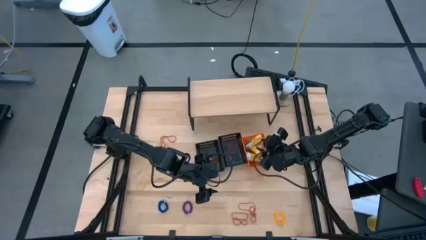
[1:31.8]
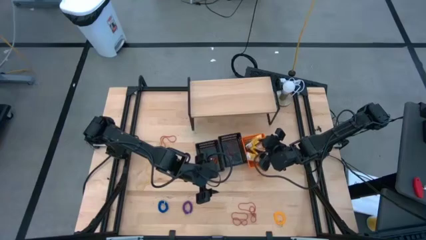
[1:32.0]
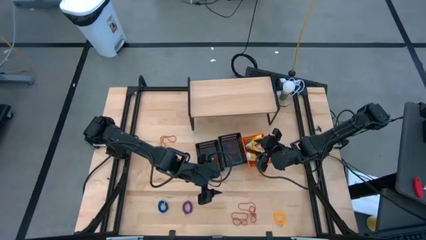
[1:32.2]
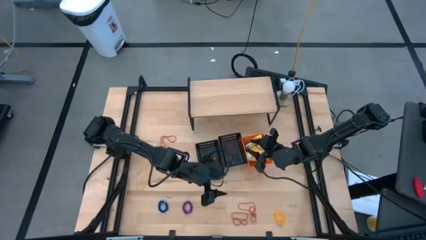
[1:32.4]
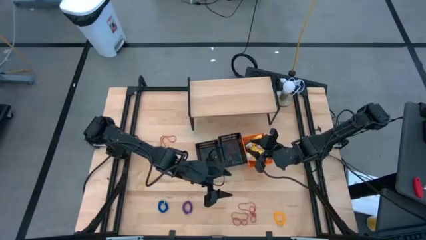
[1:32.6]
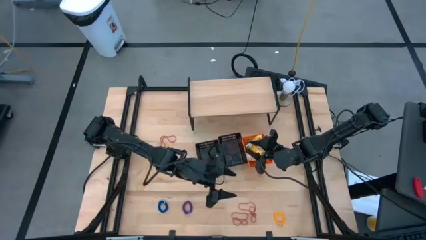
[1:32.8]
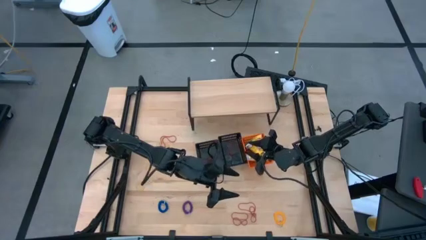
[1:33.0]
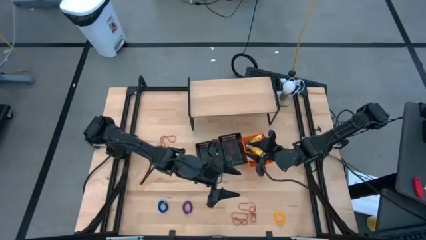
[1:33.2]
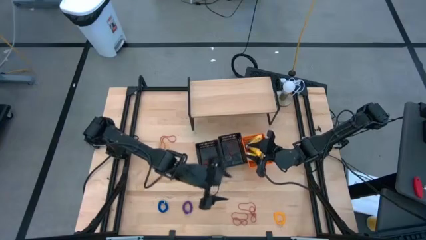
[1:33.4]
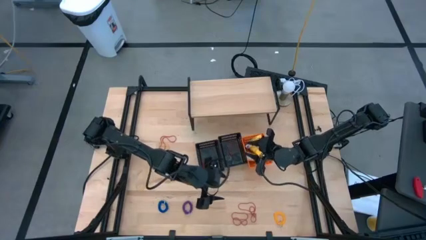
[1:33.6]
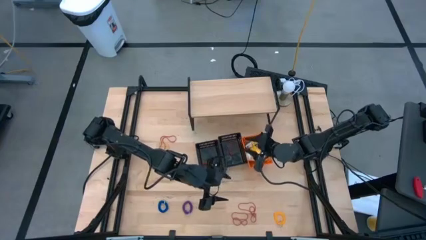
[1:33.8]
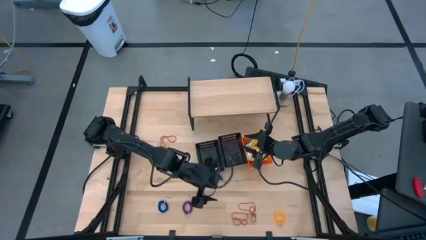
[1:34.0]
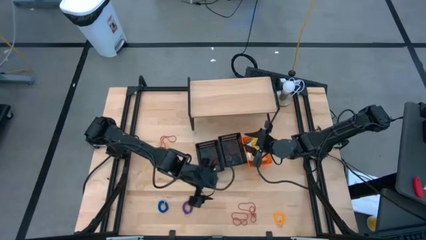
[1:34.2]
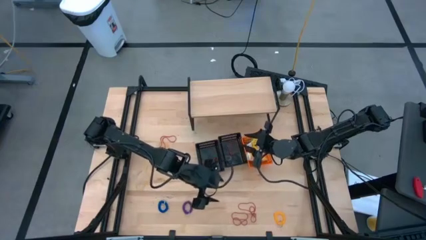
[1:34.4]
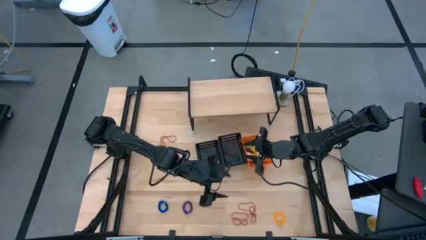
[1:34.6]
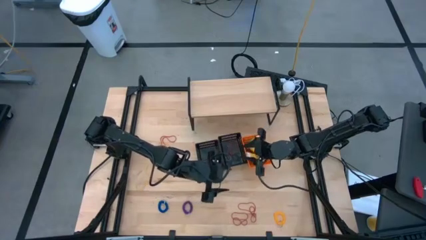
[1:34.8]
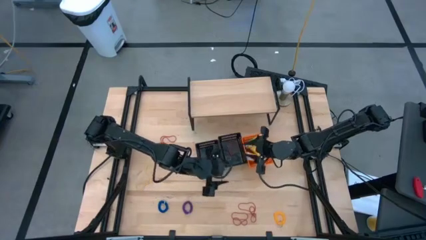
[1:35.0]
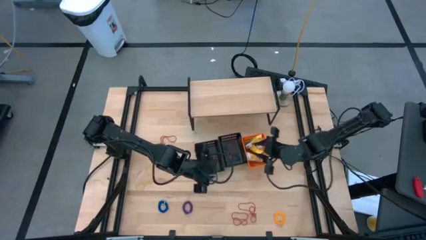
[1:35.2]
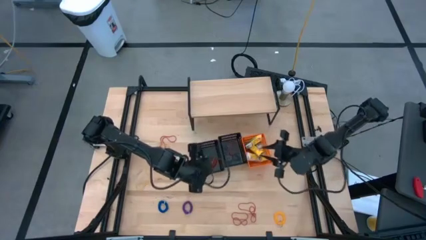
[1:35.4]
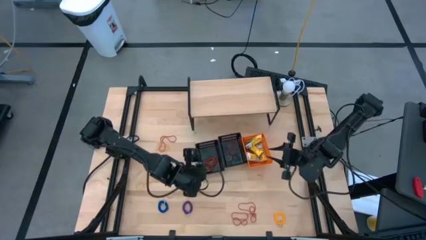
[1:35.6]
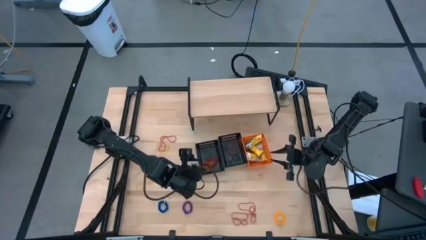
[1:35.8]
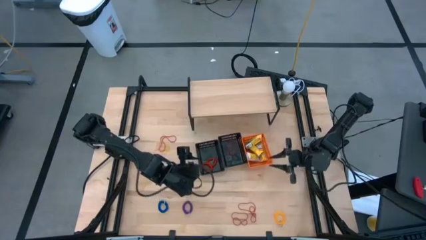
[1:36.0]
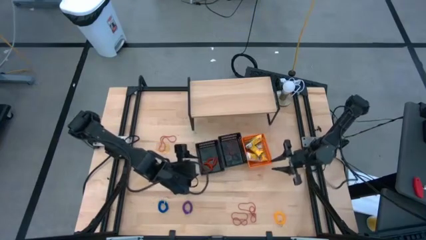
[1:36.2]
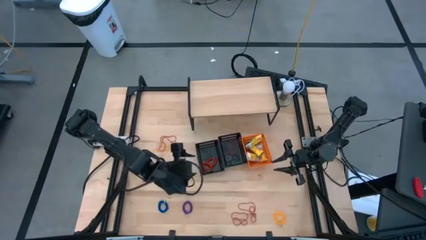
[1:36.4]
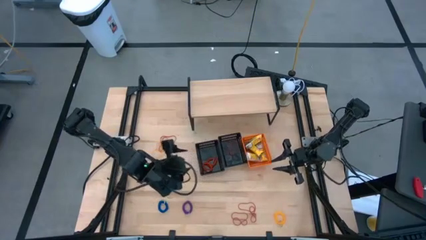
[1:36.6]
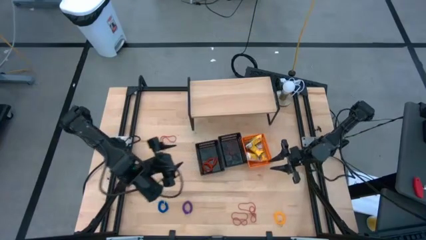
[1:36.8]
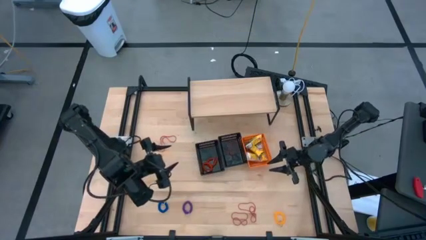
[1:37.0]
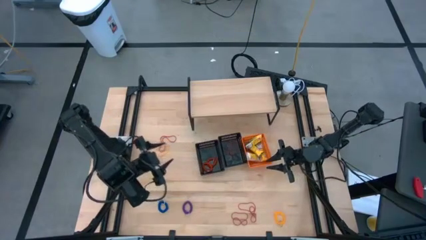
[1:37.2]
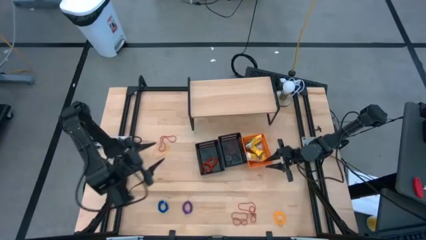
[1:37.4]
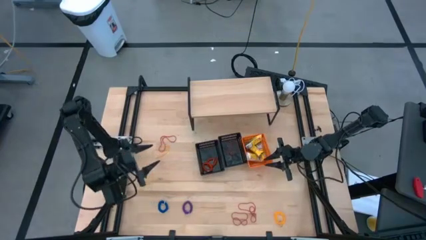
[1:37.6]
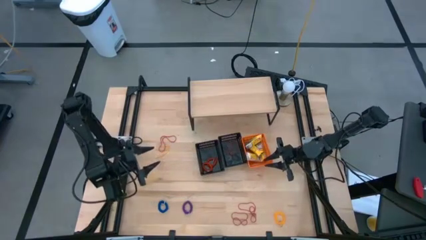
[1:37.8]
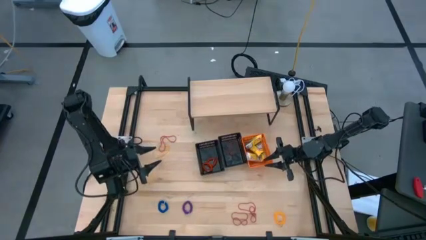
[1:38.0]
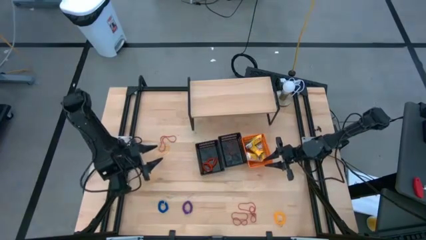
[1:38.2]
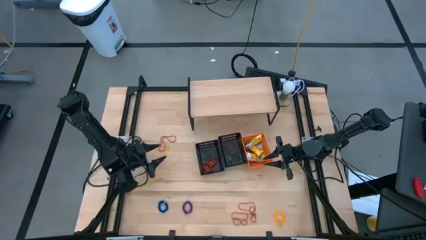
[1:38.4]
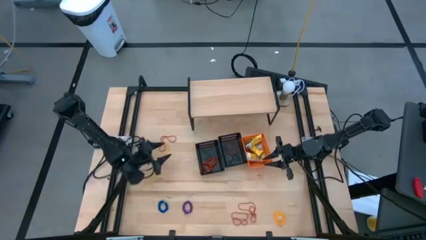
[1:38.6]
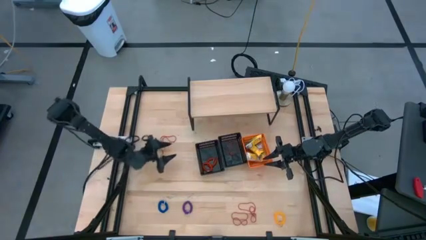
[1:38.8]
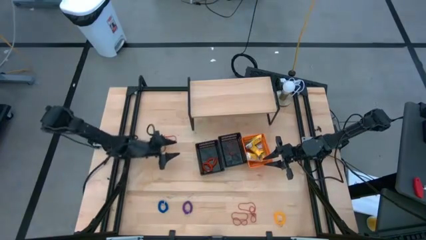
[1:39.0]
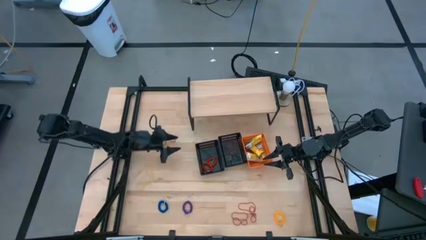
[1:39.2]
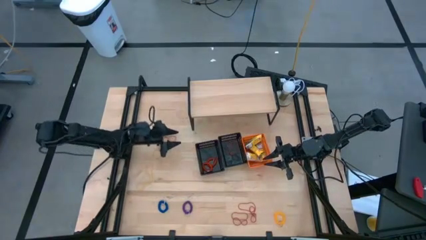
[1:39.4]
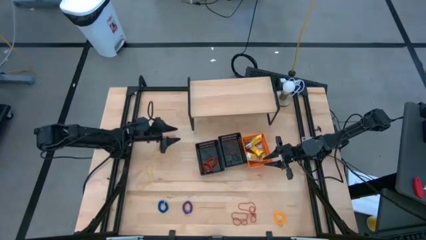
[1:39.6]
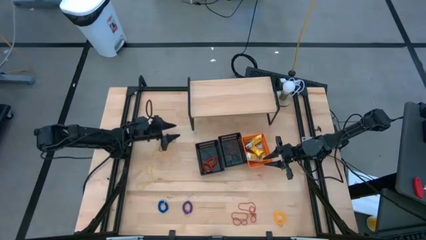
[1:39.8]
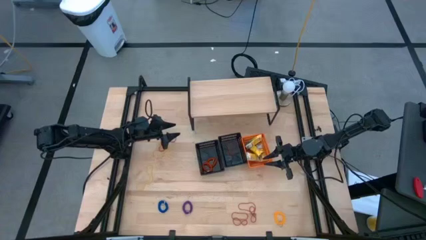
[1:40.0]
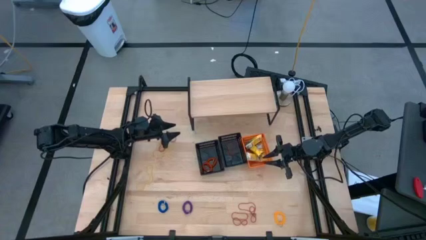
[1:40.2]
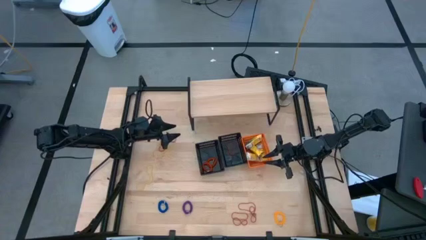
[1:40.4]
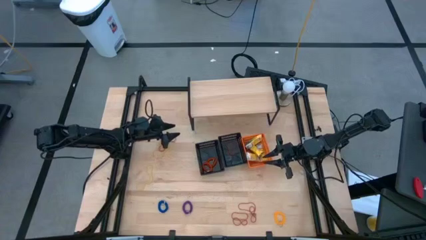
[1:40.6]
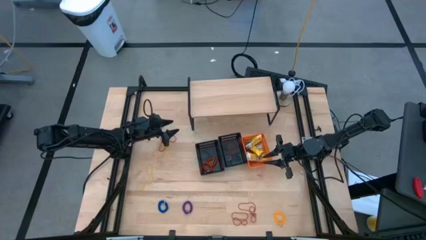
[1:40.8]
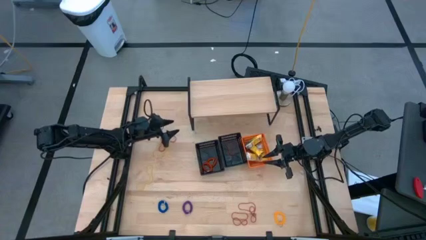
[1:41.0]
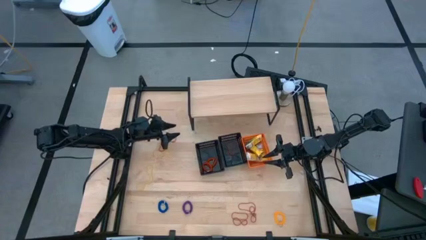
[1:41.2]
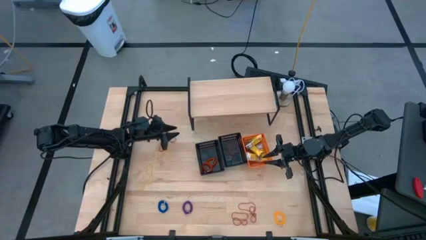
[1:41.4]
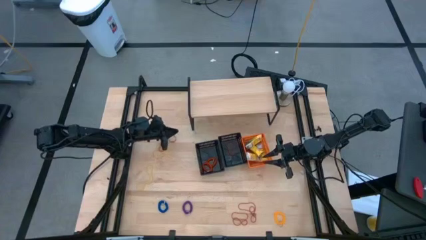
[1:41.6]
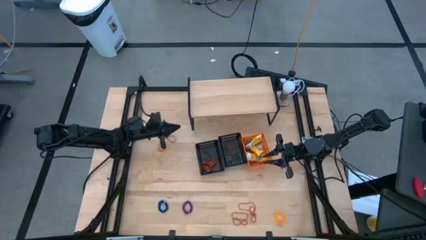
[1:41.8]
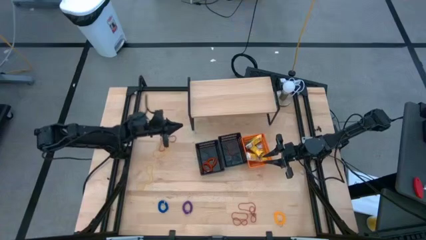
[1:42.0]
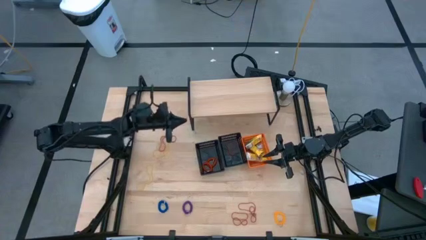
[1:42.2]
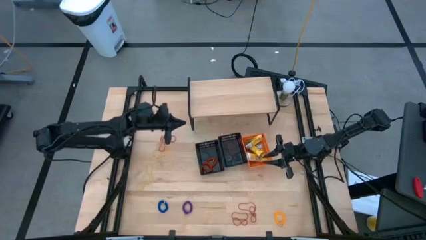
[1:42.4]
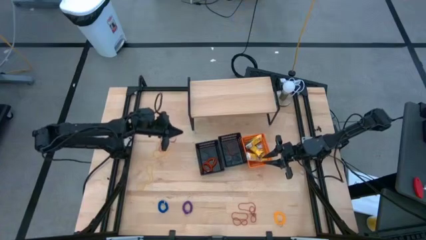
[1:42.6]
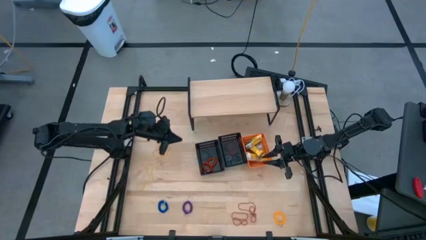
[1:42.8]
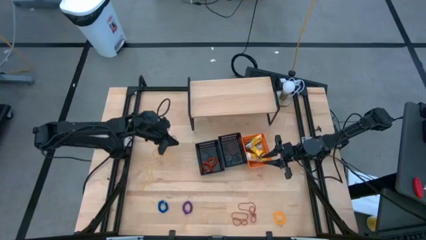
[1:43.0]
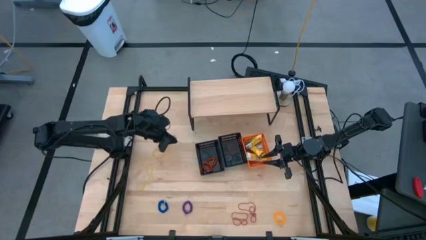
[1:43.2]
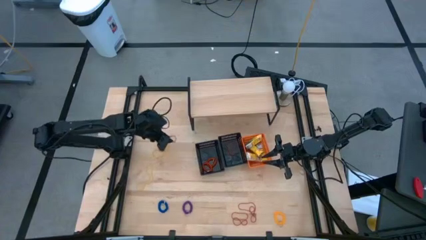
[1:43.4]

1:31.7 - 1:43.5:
Task: Pick & Place Office Desk Supplies
Put the orange rubber band into the right black bin

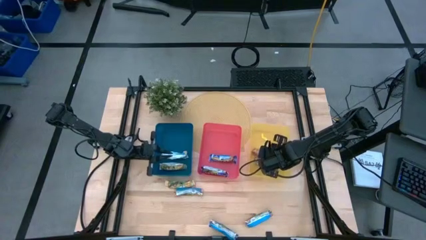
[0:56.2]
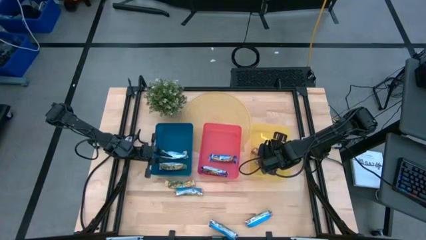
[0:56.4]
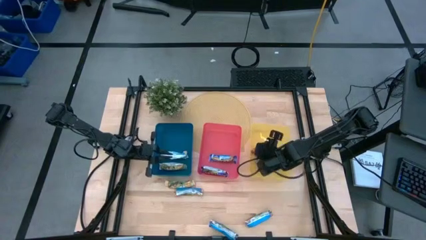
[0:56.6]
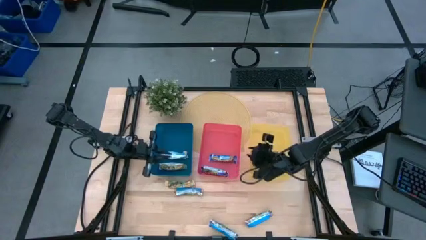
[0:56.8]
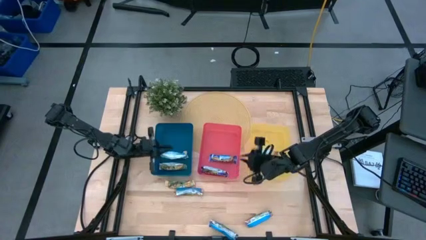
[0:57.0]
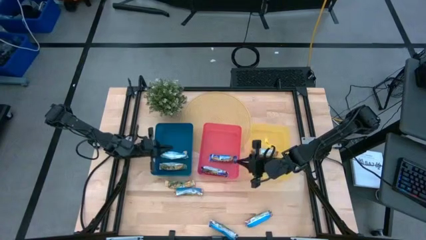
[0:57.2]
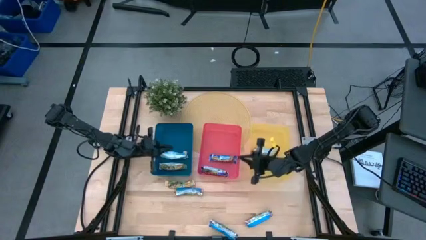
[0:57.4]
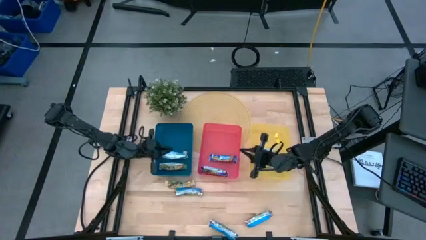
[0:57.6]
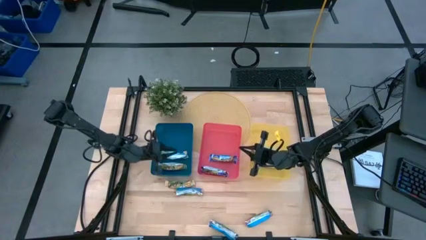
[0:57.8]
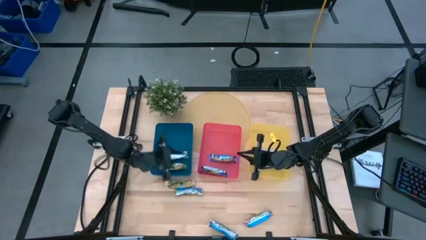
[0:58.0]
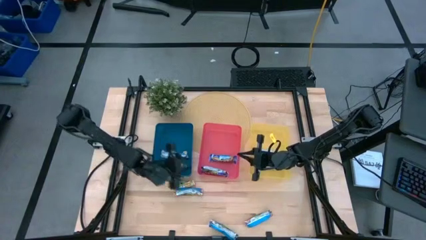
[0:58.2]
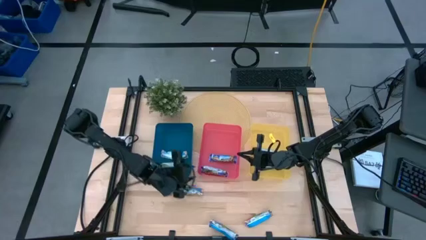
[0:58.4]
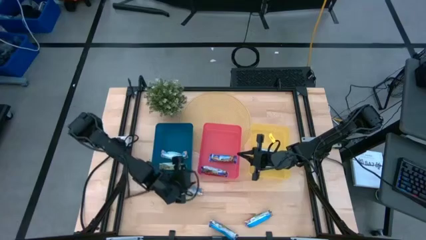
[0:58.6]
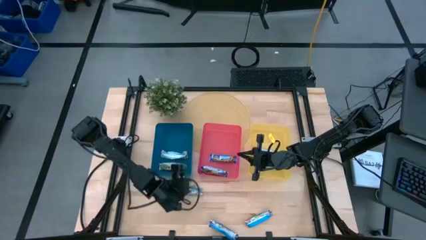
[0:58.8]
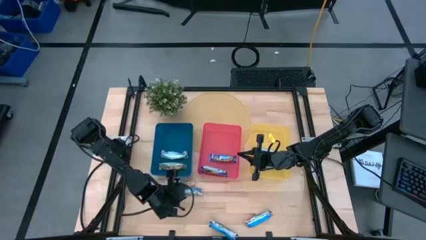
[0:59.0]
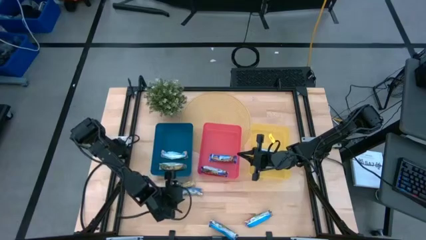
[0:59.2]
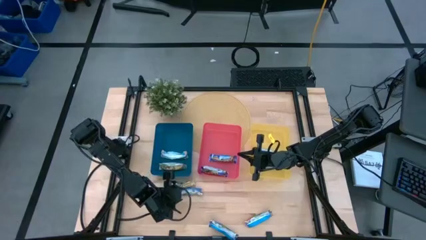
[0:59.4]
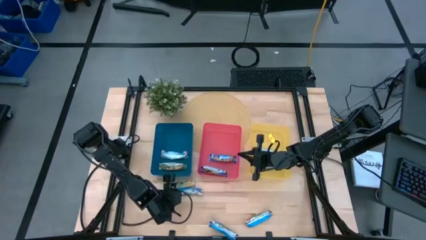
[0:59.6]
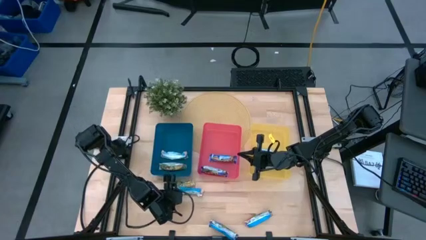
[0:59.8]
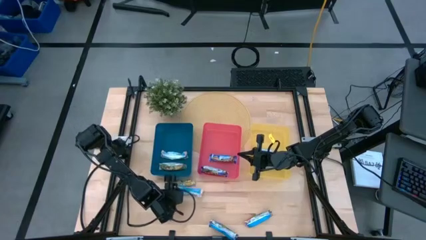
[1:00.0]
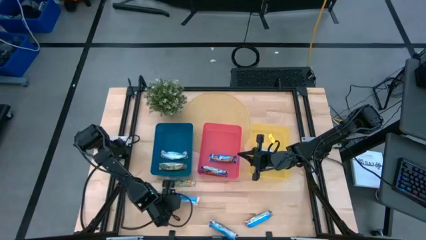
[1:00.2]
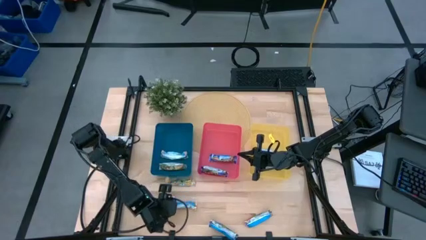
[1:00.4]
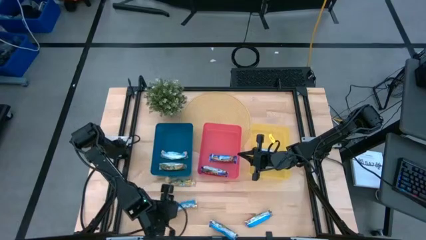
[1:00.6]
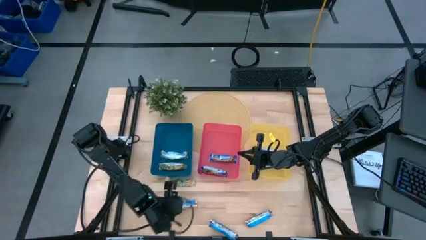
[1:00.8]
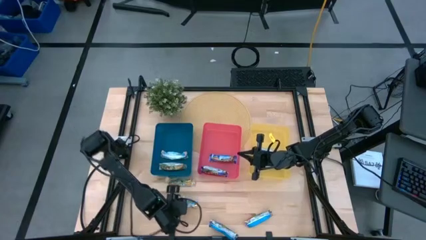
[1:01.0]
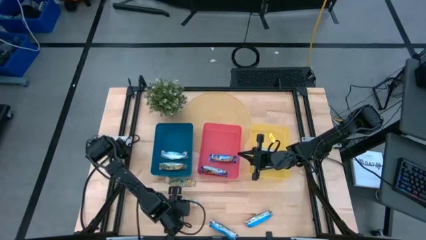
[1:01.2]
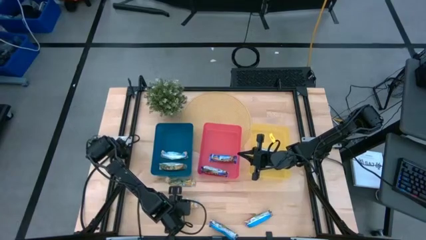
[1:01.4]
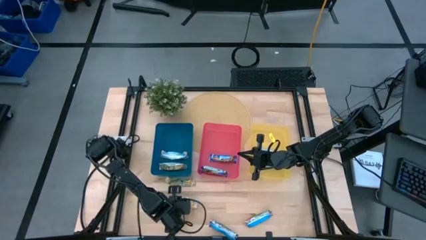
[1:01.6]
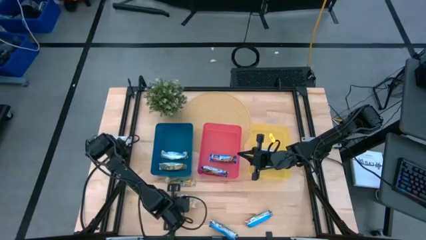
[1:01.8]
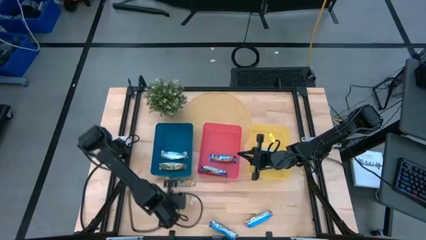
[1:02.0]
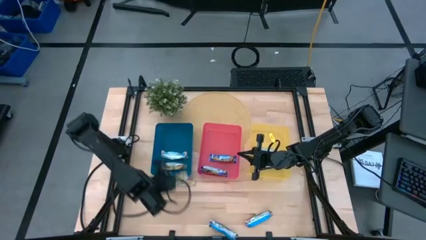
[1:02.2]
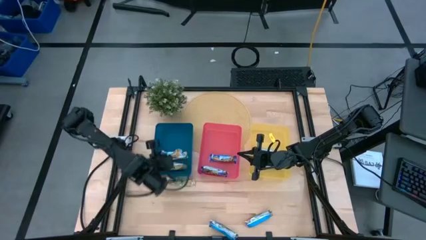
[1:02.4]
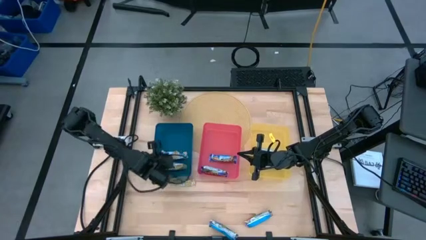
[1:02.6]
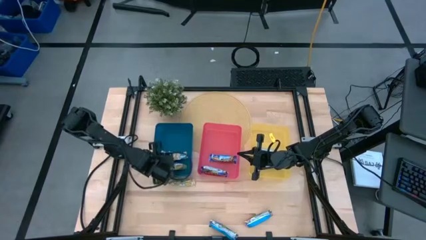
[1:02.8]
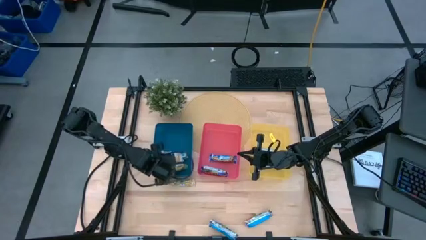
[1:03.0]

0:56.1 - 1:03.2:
Task: Pick and place Granola Bars by type
Put the orange granola bar into the blue bin
